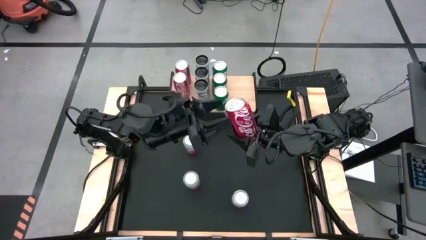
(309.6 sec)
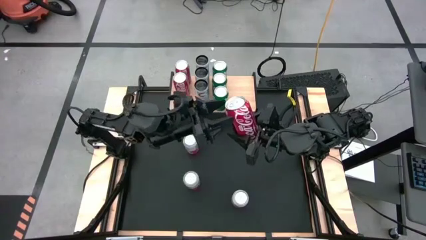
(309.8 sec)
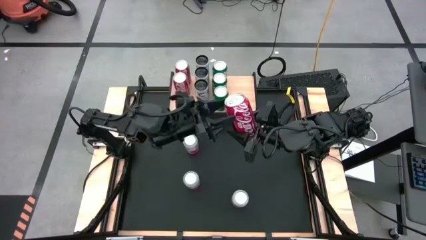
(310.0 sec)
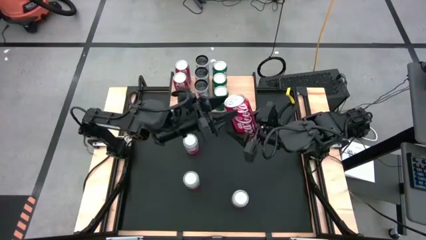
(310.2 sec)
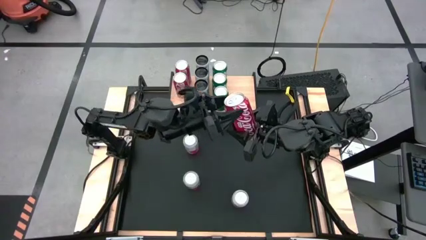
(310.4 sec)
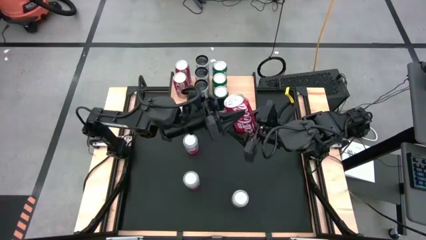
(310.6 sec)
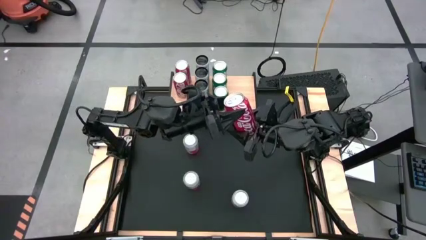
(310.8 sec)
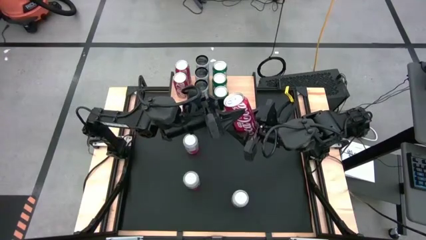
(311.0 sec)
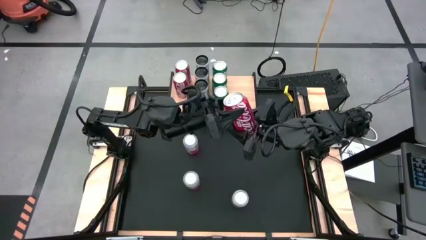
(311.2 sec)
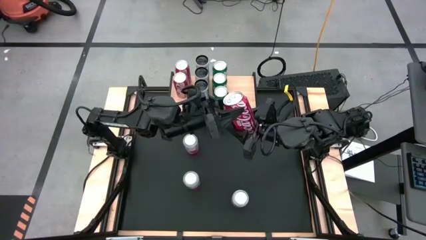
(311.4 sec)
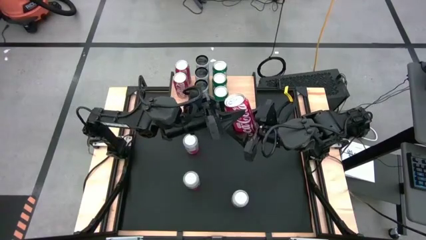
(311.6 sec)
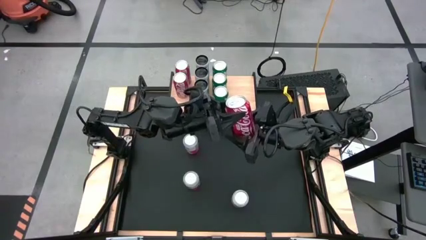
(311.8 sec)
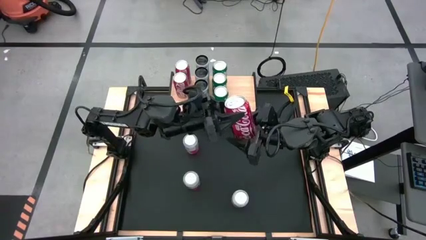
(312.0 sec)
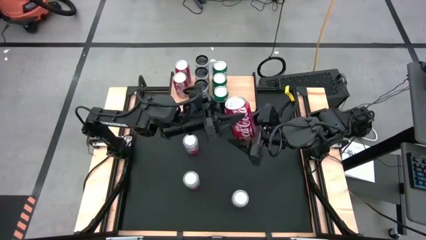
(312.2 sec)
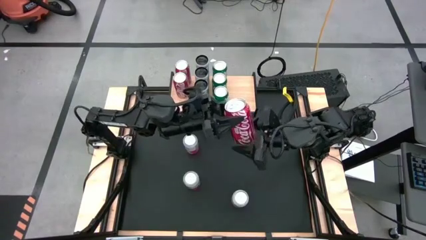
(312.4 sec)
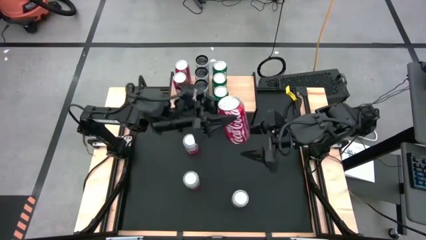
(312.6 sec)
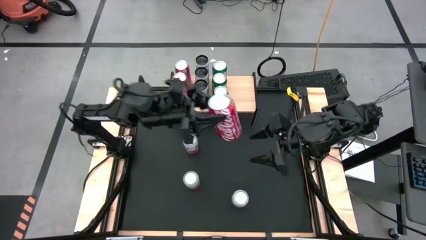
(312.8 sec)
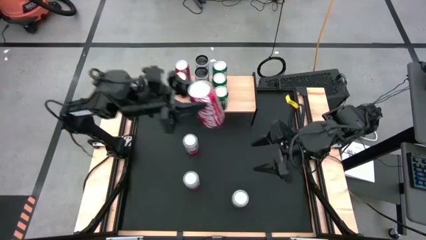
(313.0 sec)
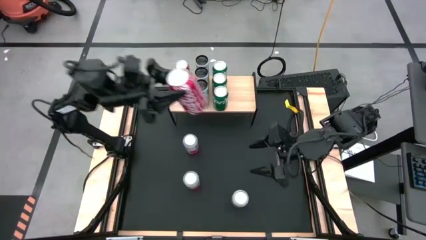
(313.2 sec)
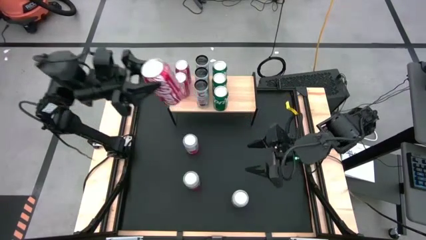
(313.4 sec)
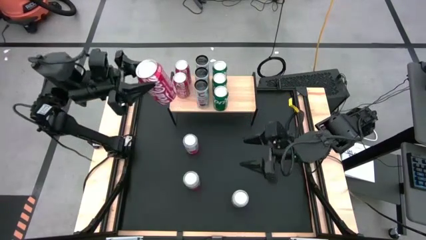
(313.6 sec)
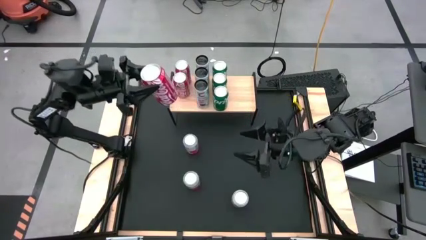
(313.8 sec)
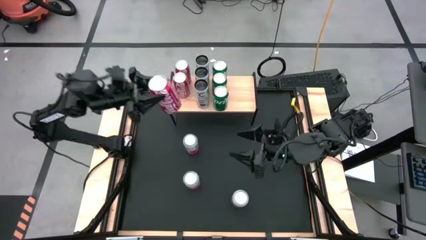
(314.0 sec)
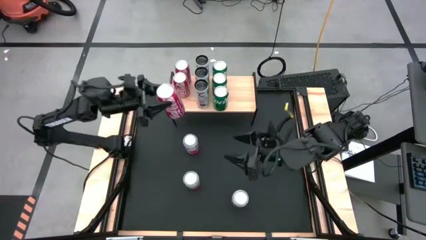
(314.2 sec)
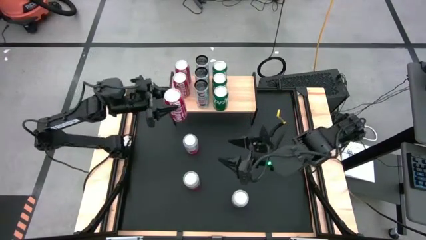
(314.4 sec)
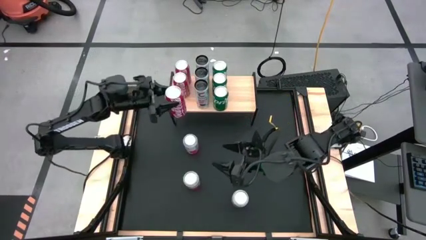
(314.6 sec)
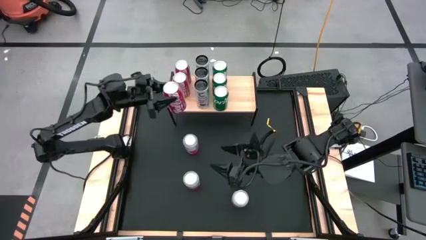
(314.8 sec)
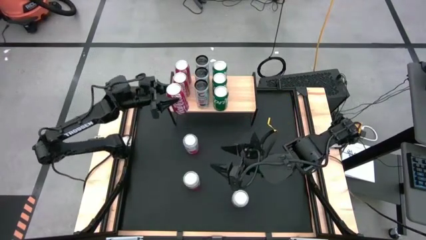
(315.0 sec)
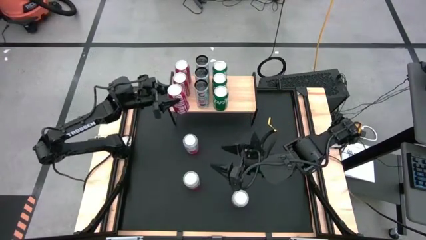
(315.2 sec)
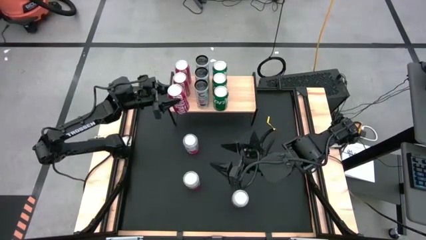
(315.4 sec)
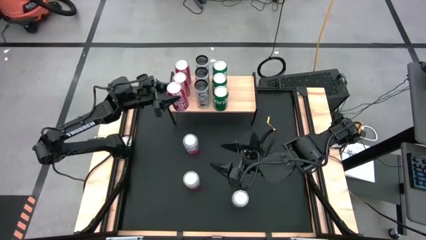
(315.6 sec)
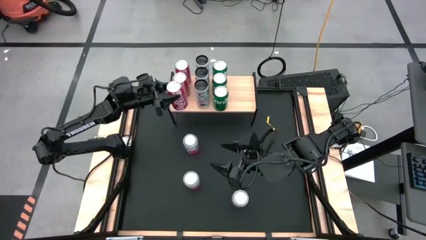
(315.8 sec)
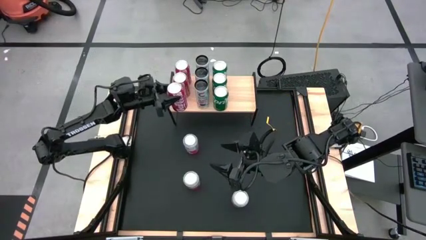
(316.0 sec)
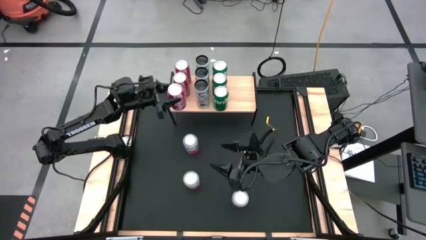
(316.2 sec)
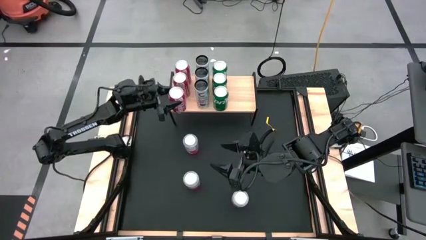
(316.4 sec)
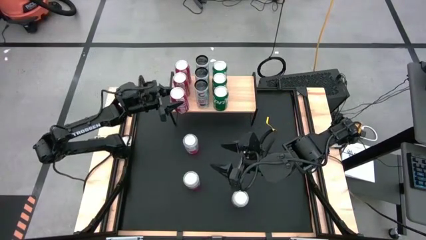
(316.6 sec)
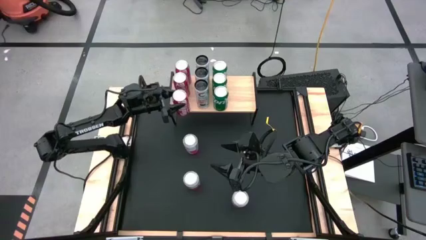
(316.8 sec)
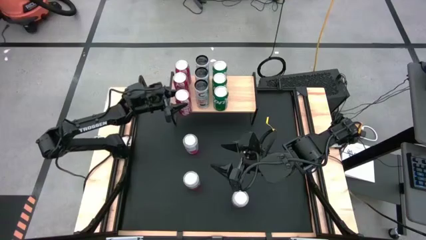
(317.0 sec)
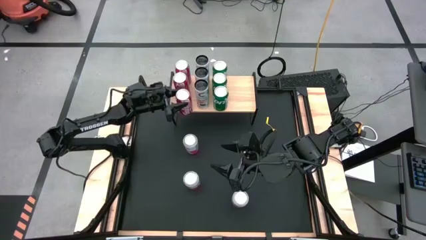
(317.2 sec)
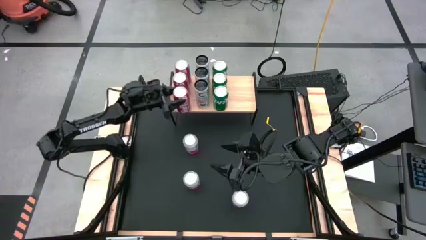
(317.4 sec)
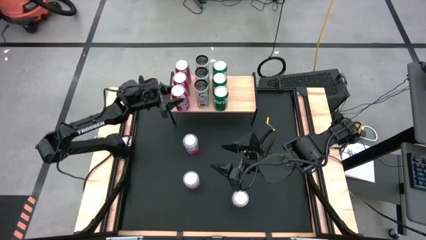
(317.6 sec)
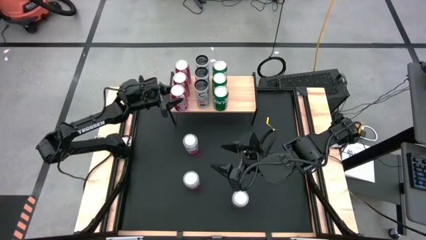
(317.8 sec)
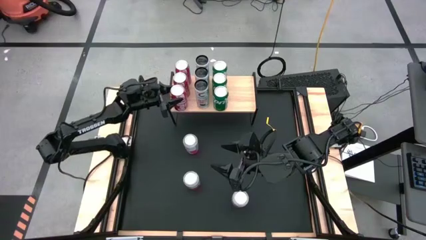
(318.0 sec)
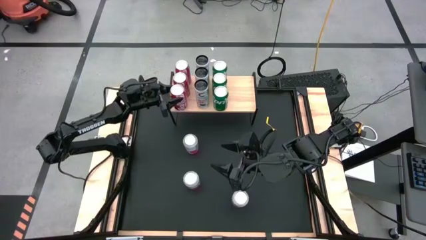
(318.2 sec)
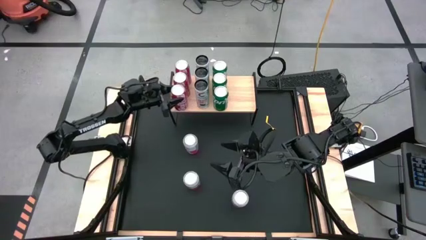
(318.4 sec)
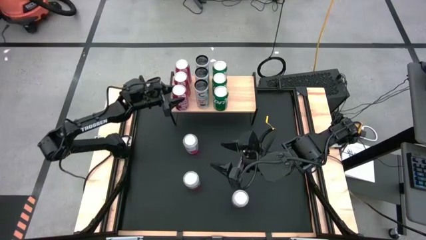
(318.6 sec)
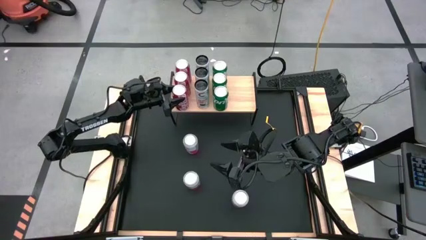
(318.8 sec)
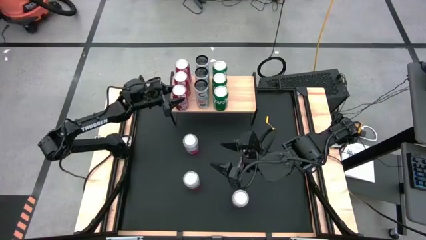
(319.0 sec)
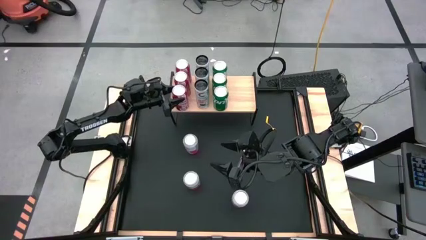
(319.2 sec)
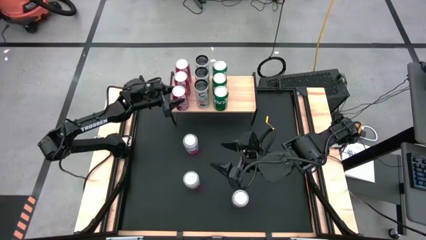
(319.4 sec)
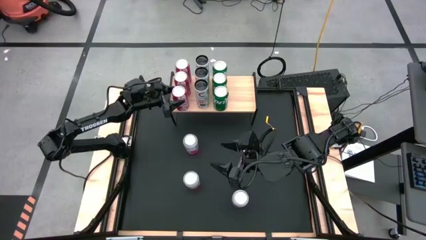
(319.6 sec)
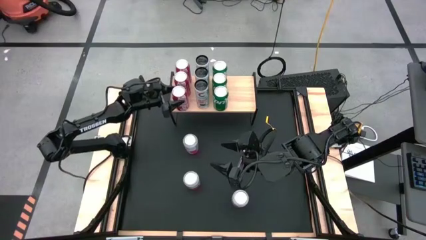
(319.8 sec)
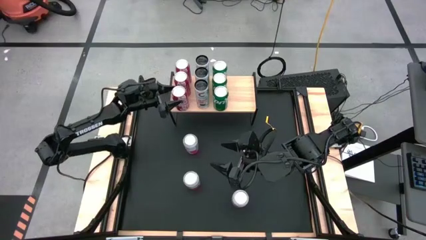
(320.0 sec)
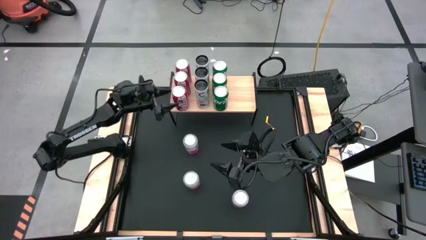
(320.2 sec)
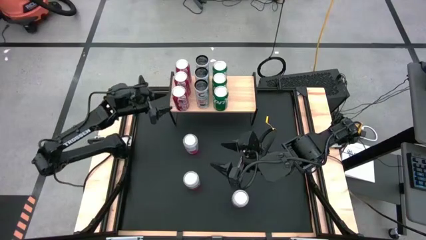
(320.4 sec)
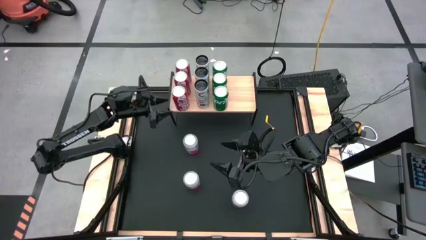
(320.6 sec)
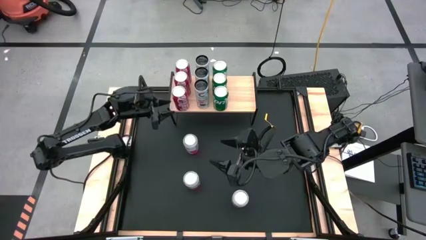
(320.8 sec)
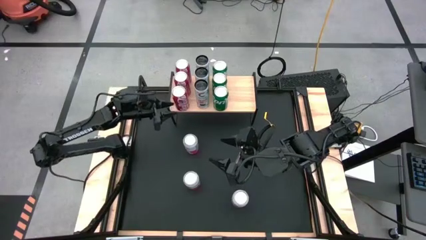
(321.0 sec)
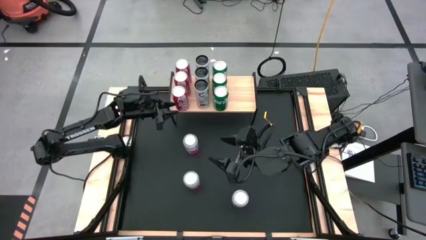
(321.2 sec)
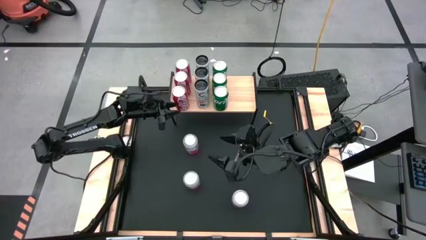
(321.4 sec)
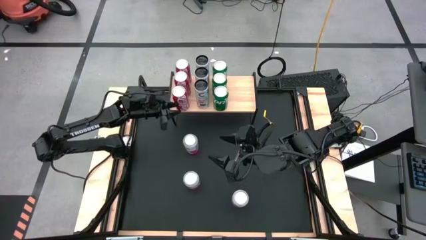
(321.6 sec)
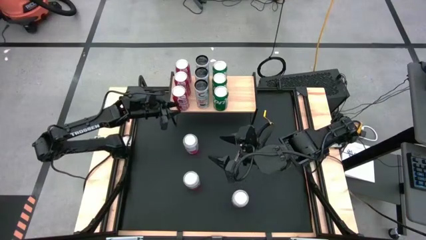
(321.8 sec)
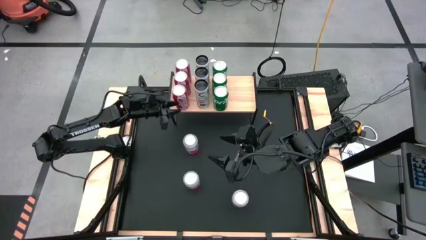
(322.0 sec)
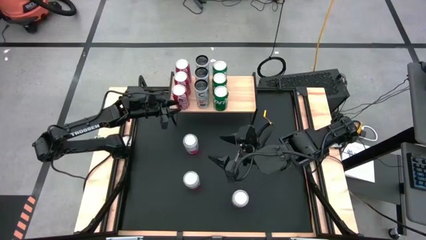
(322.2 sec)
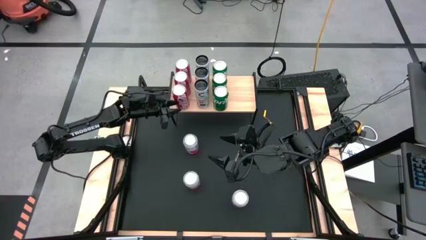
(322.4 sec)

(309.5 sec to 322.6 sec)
Task: Place canned beverage on shelf
Put the red white soda can aligned with the other red soda can on the shelf
